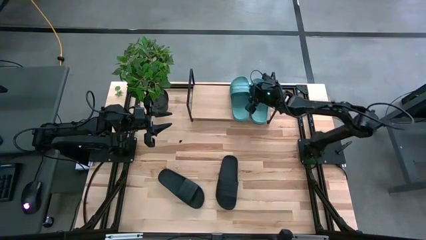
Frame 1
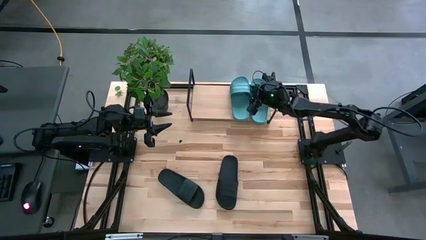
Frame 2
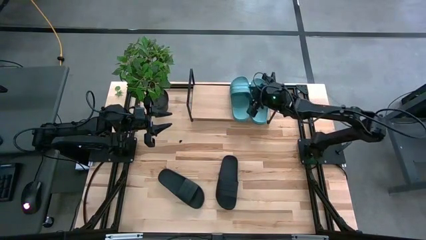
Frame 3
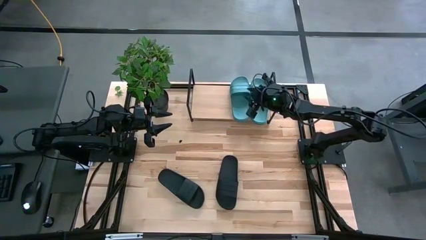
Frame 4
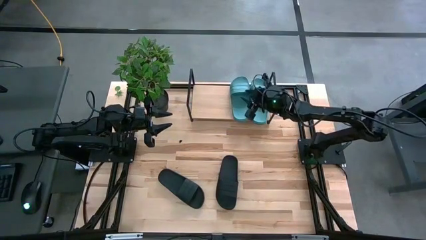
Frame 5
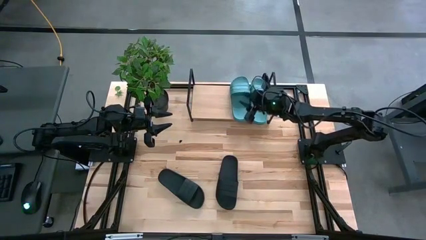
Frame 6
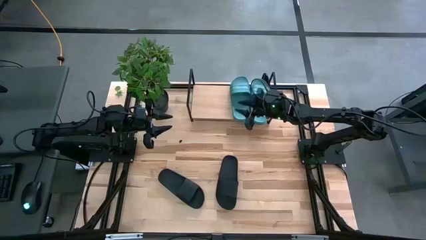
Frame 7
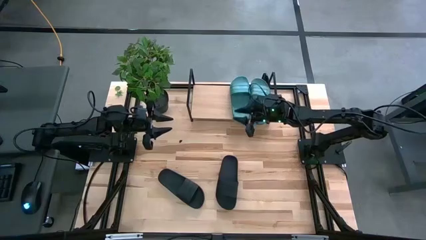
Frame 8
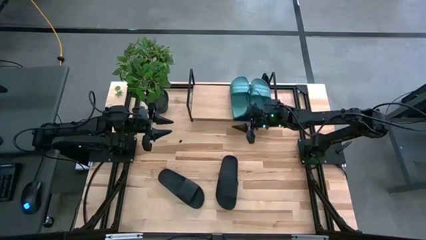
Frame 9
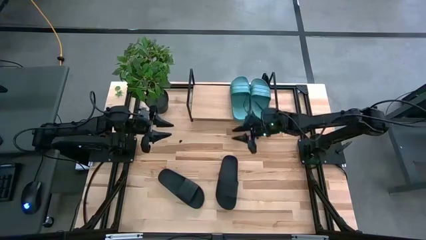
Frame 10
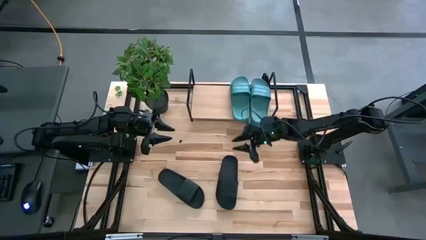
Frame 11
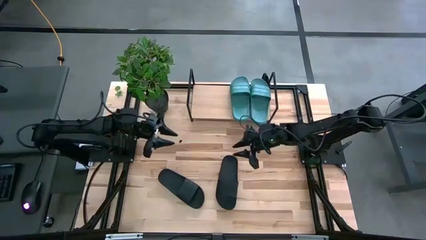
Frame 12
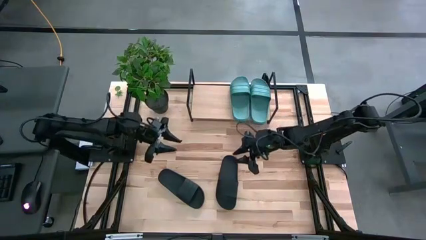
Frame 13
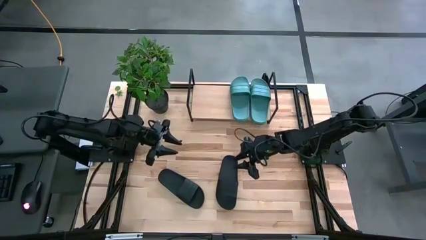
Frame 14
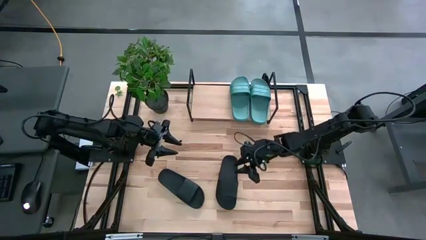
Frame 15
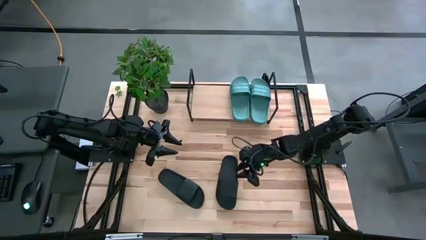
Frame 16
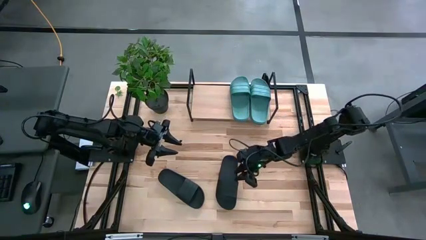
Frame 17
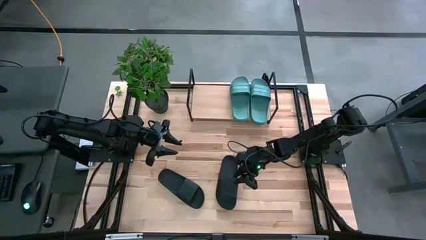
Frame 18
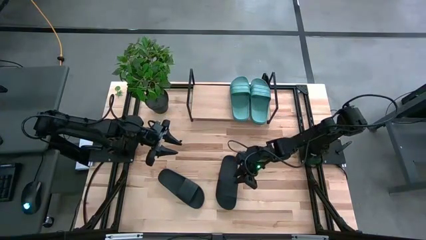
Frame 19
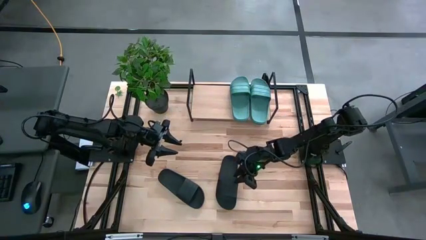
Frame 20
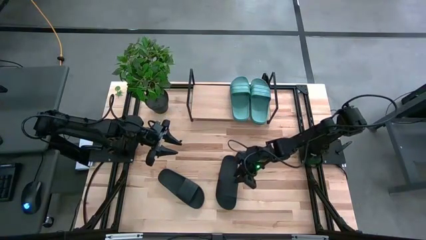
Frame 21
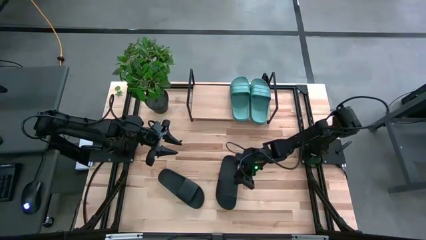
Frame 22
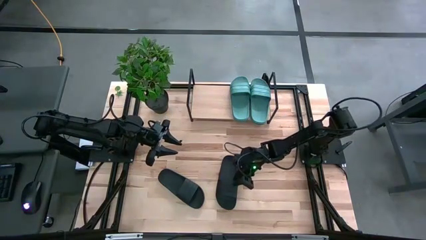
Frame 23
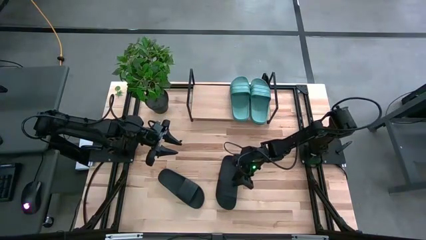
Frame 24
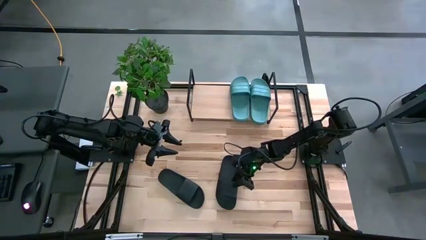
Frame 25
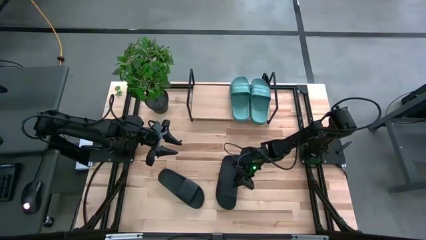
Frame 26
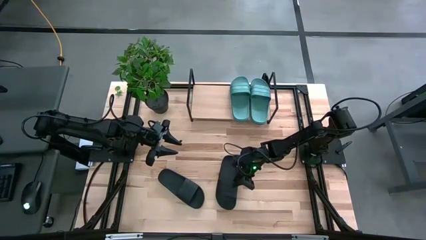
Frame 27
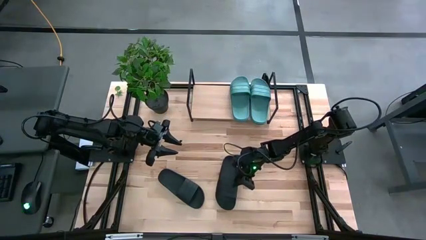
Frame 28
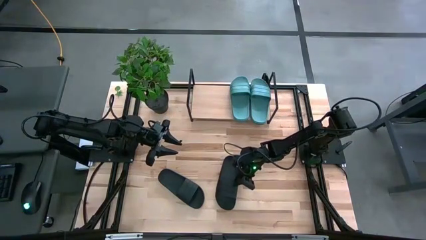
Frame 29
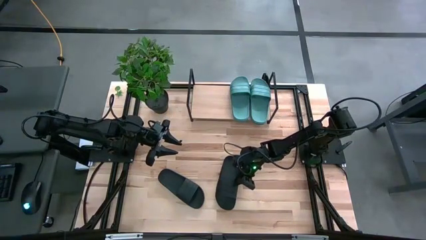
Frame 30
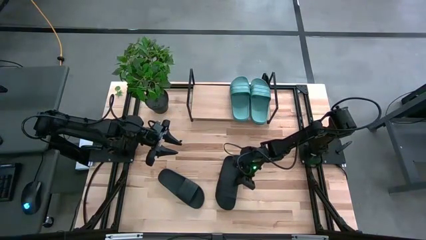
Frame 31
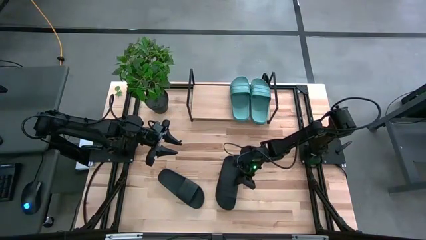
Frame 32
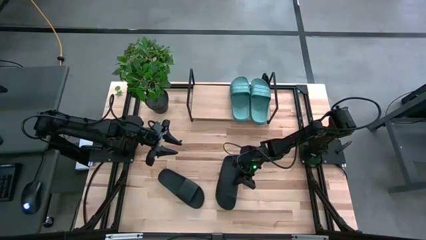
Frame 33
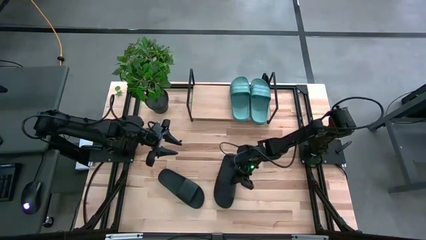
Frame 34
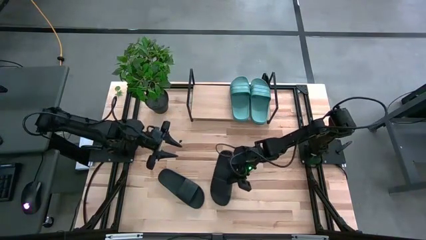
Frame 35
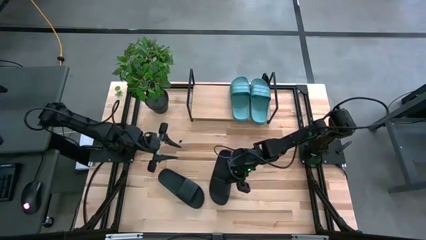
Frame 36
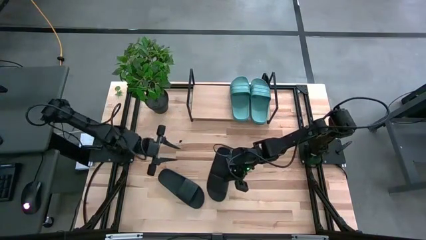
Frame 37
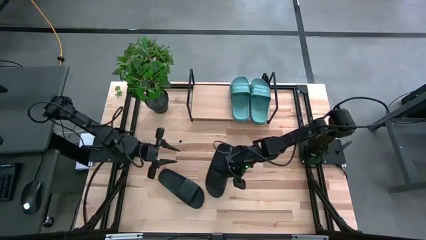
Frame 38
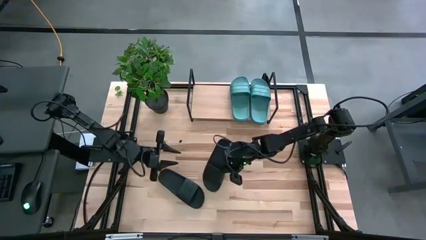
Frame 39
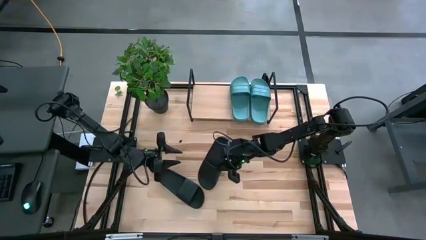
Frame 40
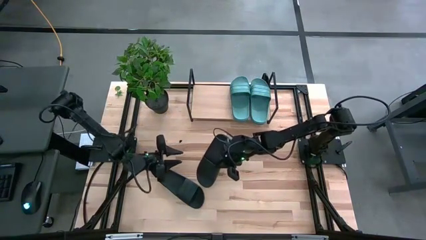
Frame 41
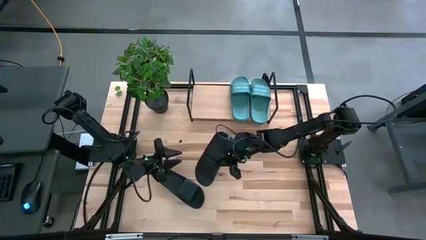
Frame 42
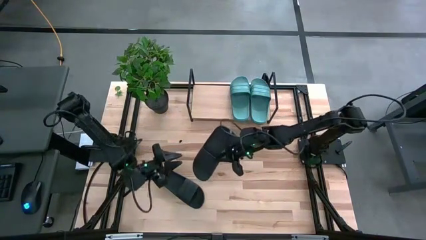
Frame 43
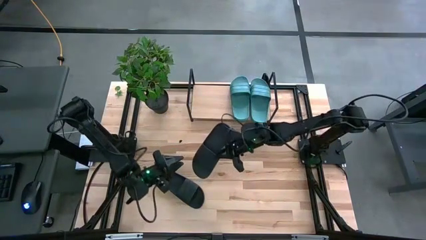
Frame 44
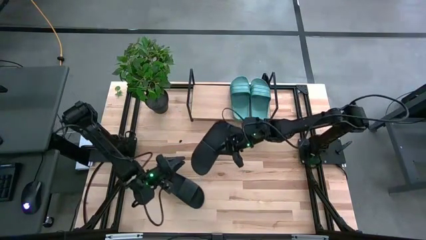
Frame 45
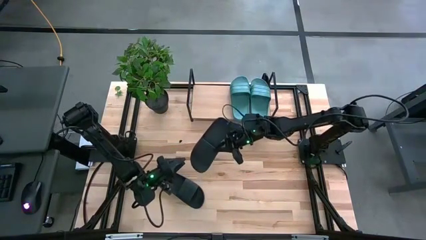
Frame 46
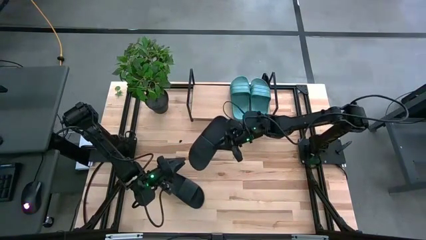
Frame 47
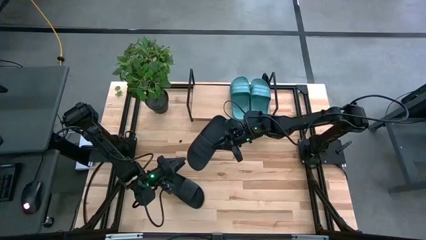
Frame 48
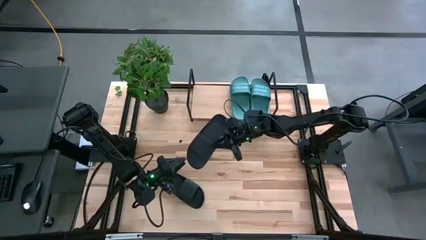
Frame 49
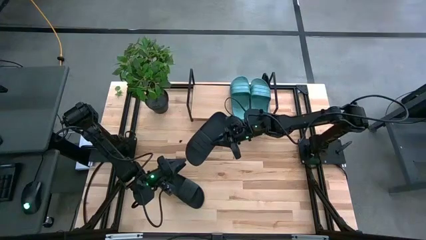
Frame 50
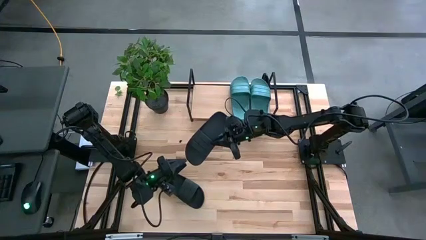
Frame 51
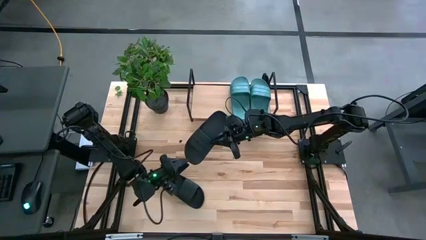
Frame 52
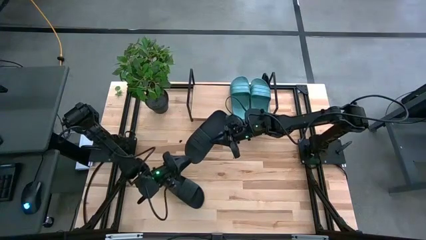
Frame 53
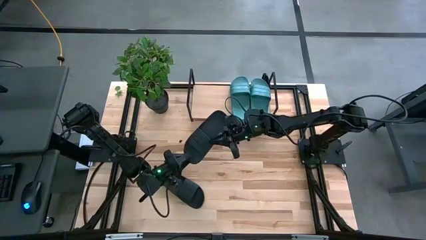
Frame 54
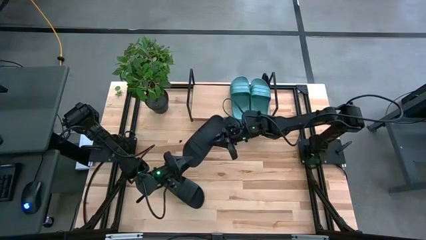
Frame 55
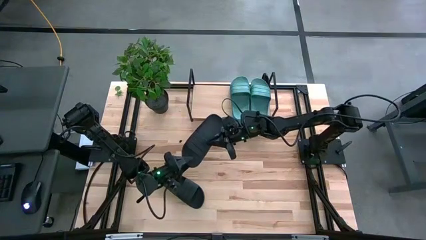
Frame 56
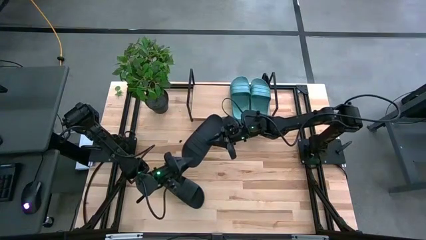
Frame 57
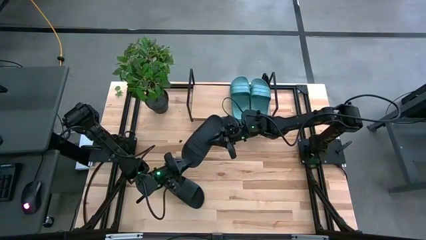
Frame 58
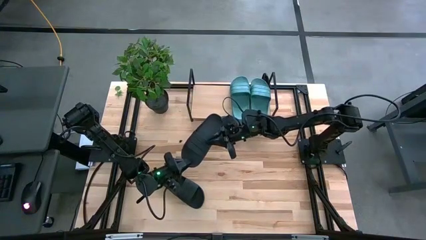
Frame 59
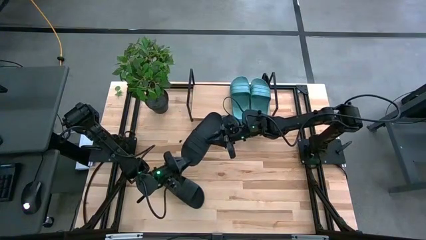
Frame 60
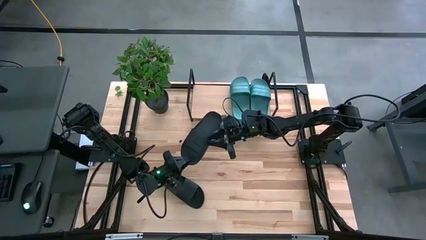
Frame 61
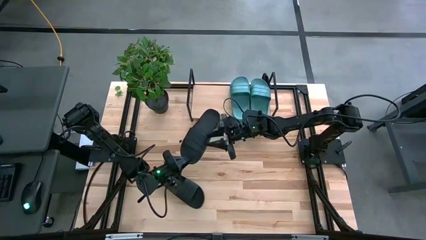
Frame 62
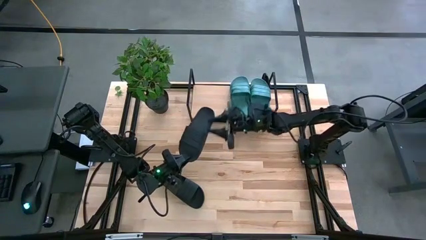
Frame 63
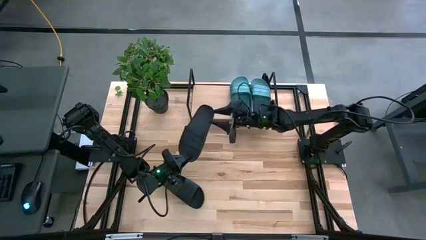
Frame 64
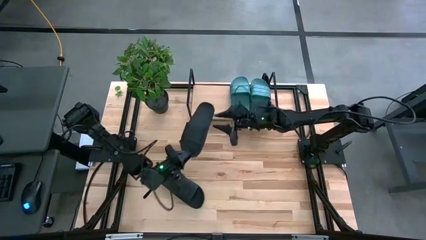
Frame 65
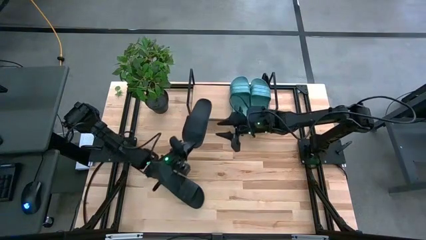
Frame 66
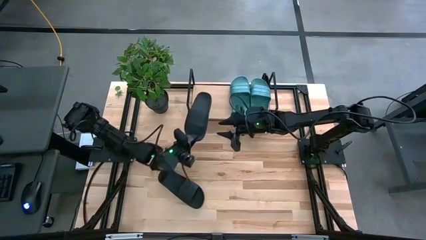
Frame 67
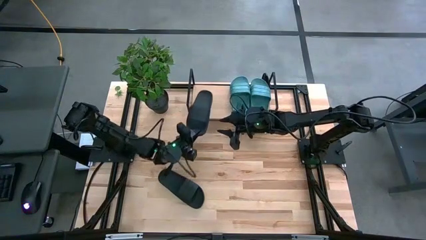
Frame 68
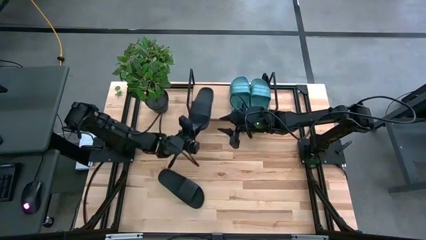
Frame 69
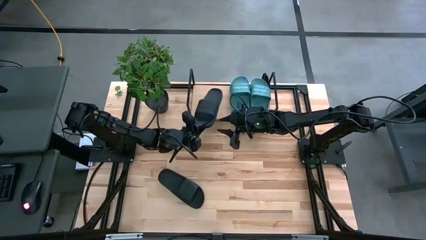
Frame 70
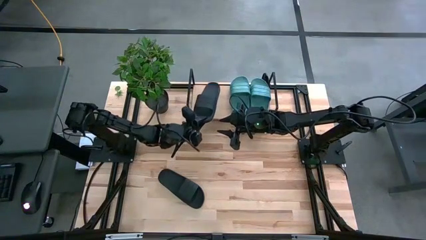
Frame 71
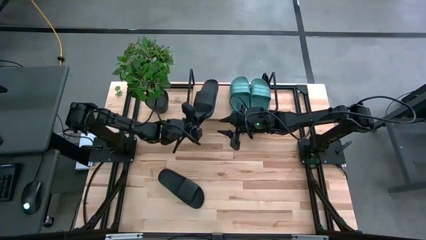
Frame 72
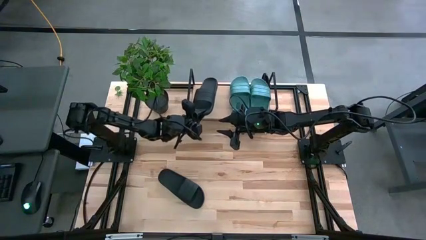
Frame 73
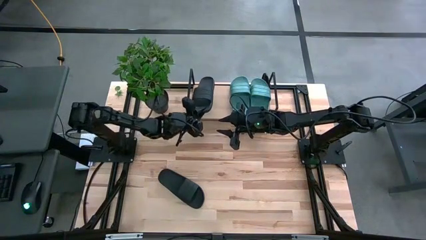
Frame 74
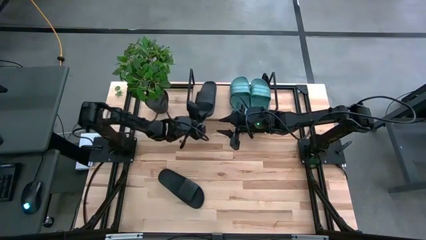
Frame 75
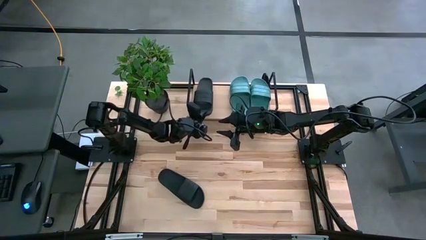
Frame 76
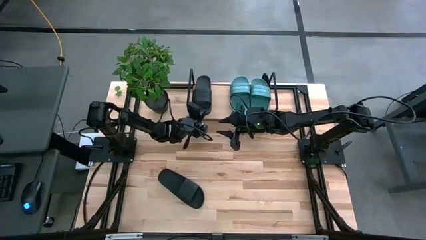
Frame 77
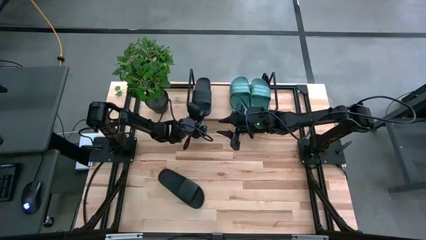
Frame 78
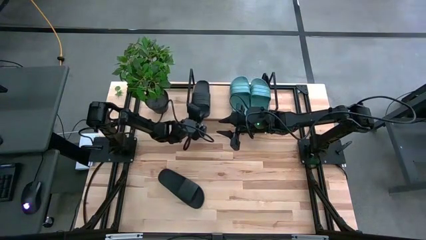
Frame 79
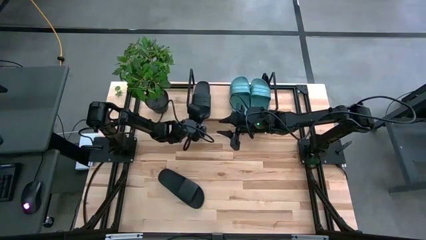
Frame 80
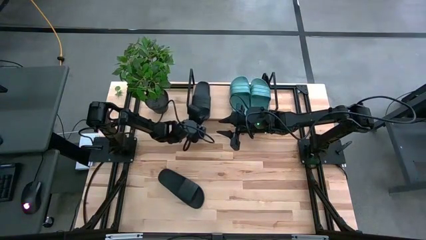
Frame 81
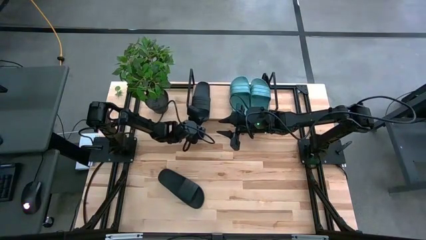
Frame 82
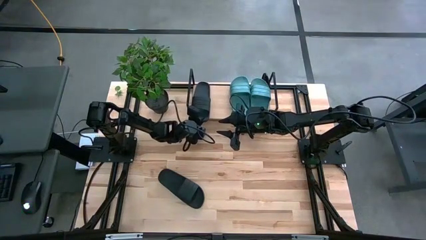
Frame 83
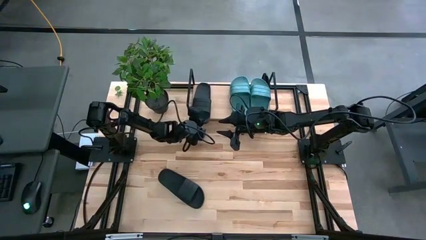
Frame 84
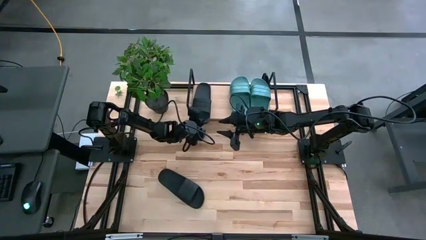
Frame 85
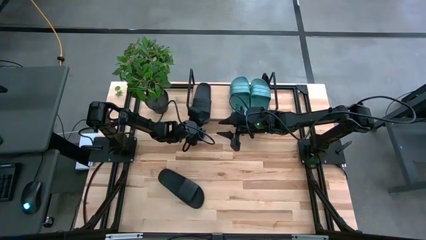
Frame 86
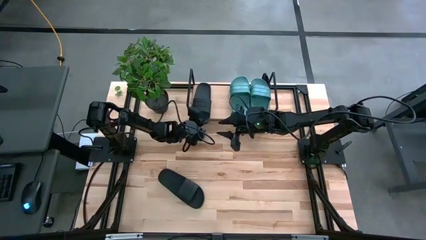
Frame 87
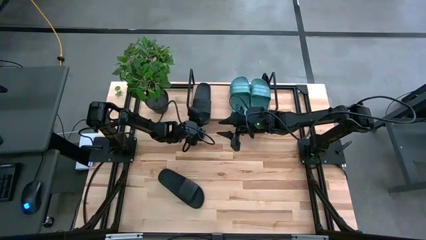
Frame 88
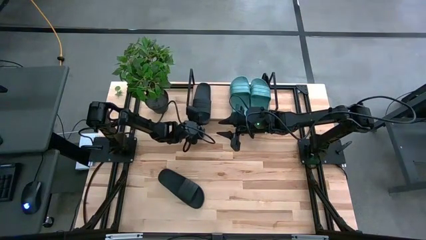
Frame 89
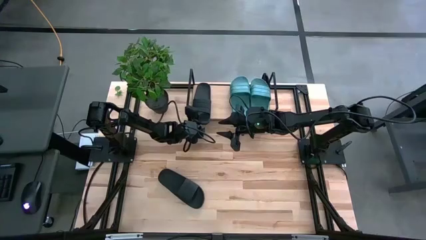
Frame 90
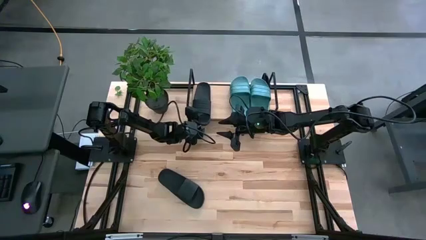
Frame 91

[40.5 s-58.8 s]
Task: Pick and place slides into the shelf
Put the right black slipper on the shelf
